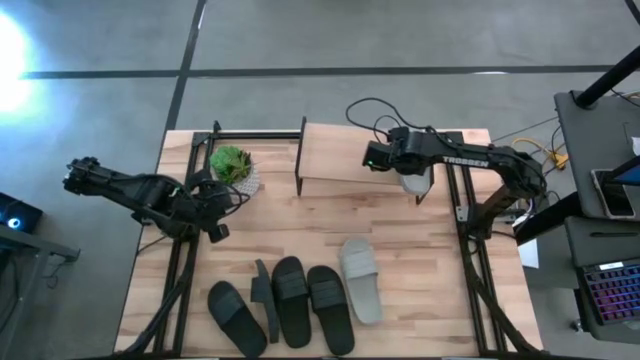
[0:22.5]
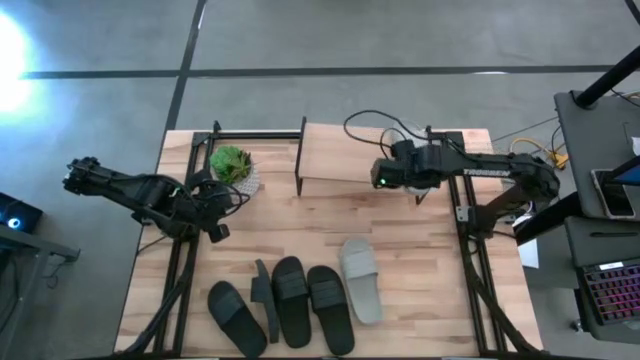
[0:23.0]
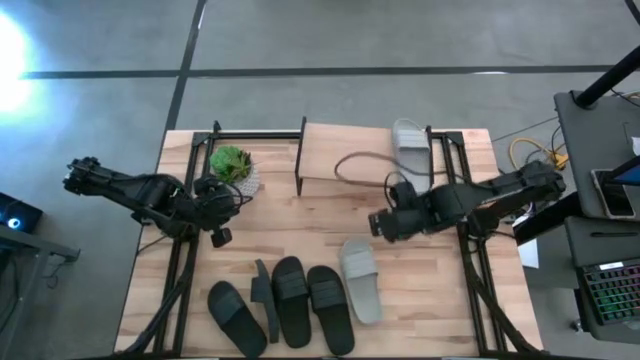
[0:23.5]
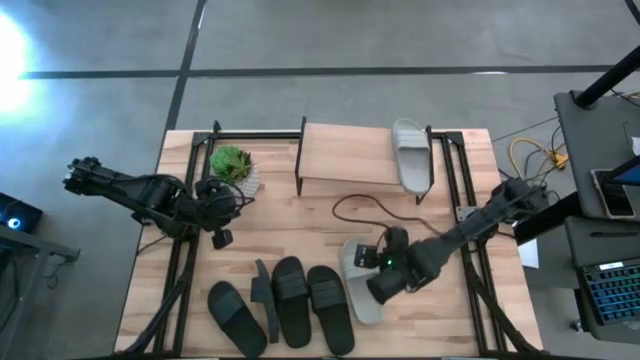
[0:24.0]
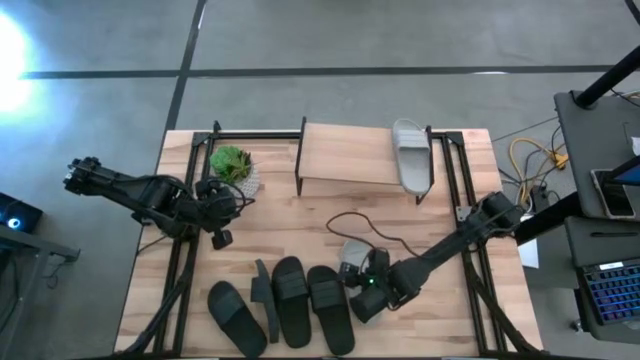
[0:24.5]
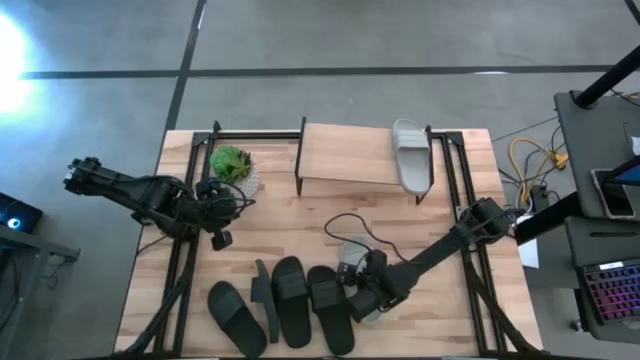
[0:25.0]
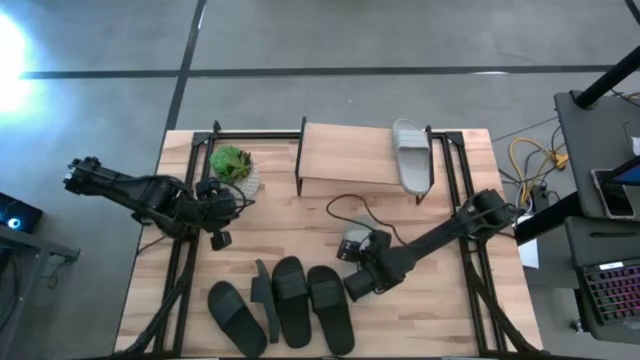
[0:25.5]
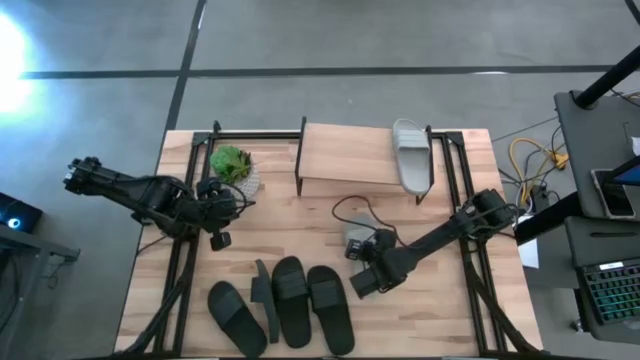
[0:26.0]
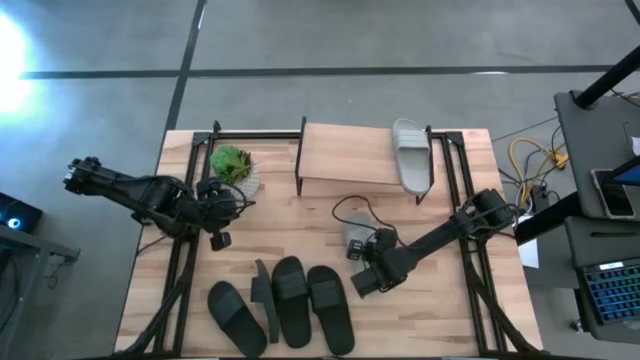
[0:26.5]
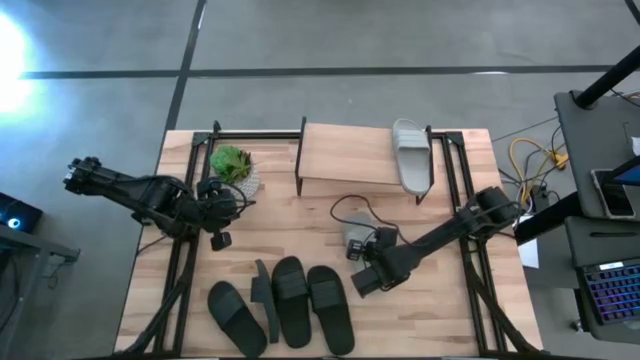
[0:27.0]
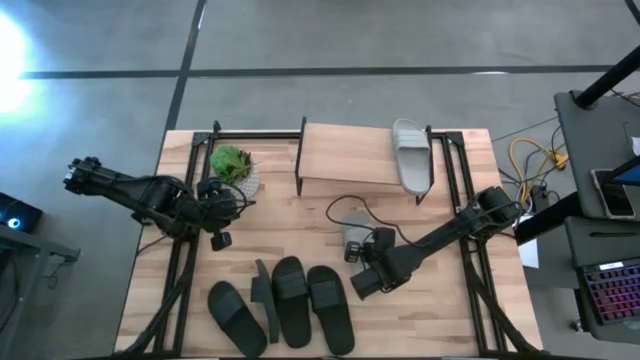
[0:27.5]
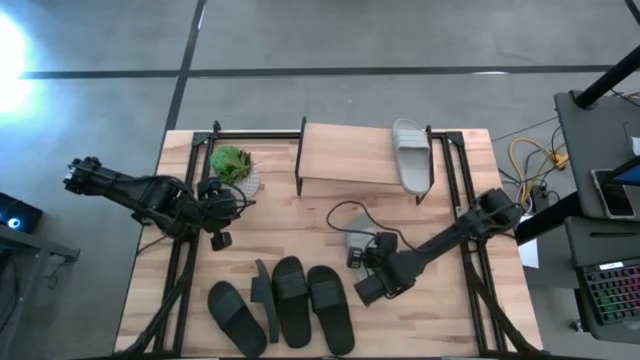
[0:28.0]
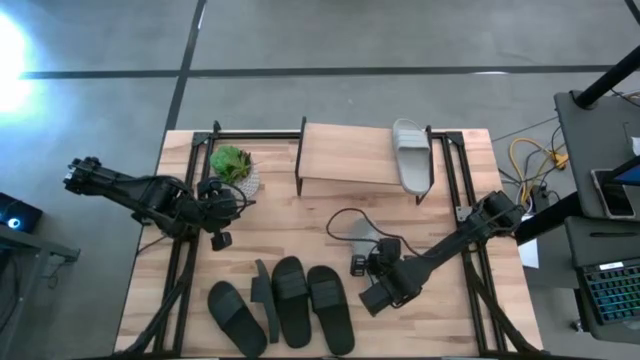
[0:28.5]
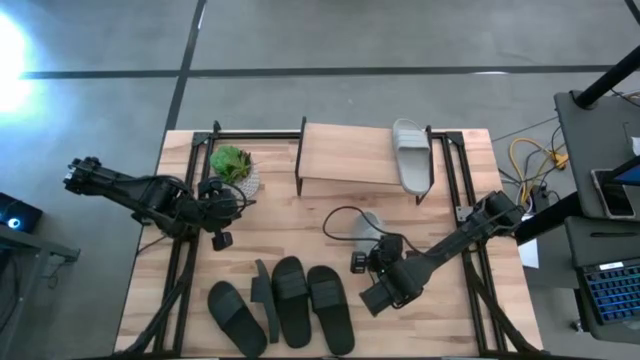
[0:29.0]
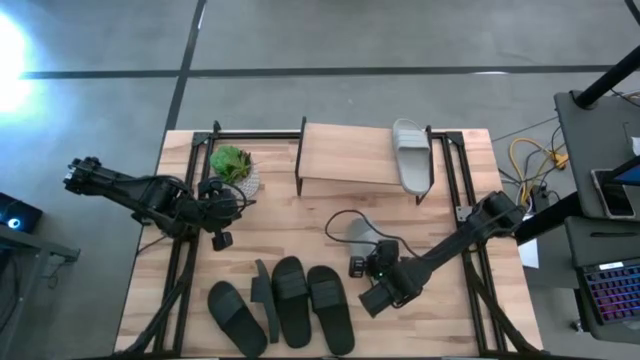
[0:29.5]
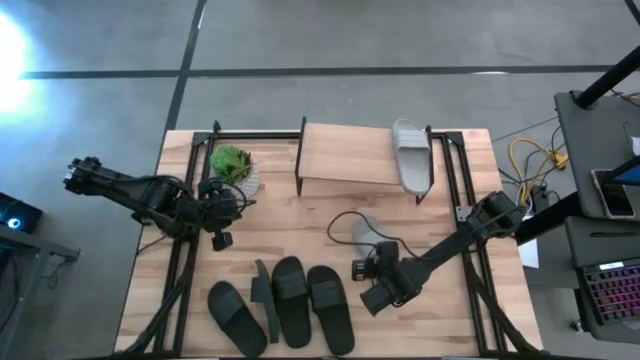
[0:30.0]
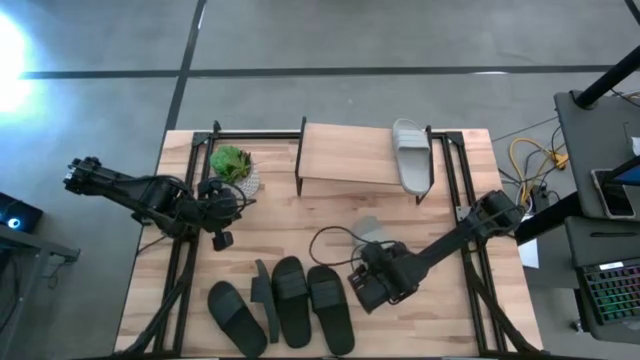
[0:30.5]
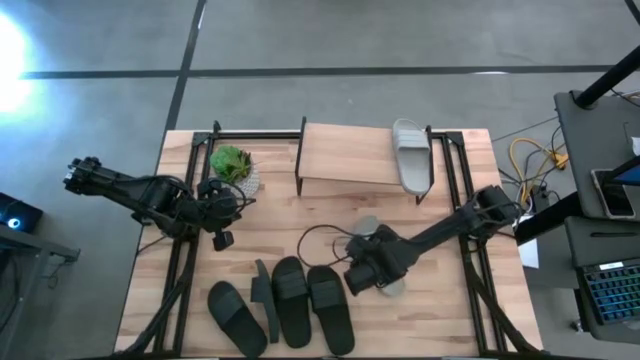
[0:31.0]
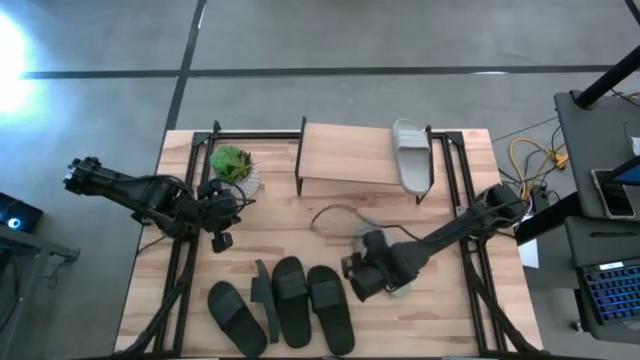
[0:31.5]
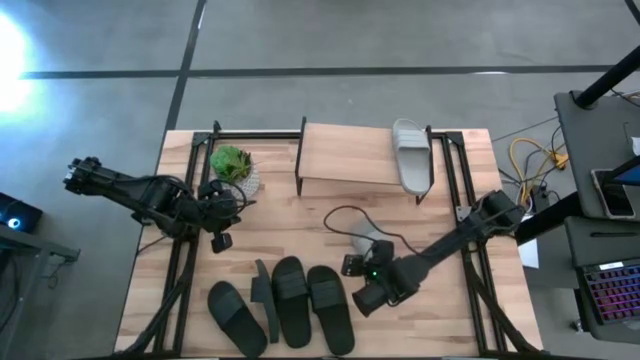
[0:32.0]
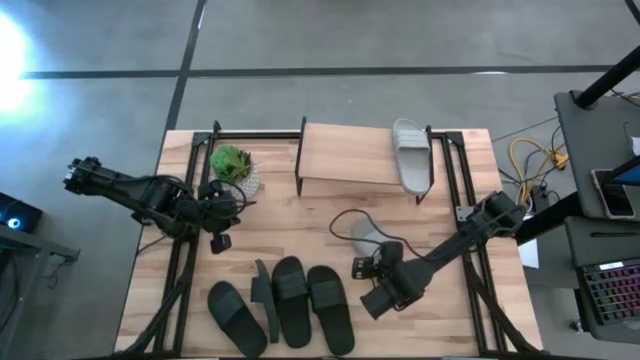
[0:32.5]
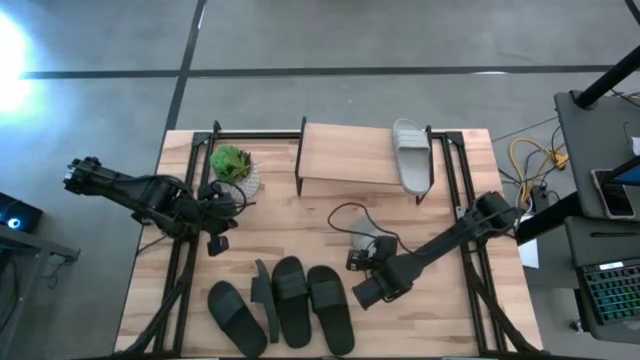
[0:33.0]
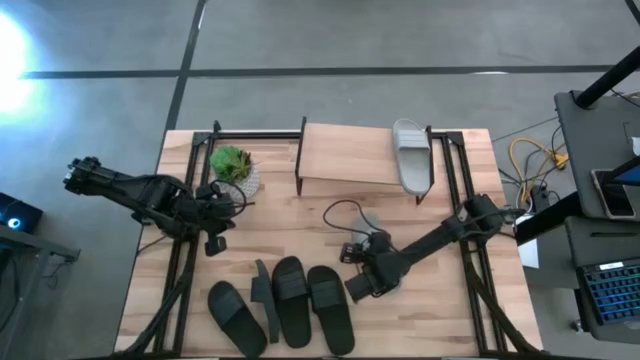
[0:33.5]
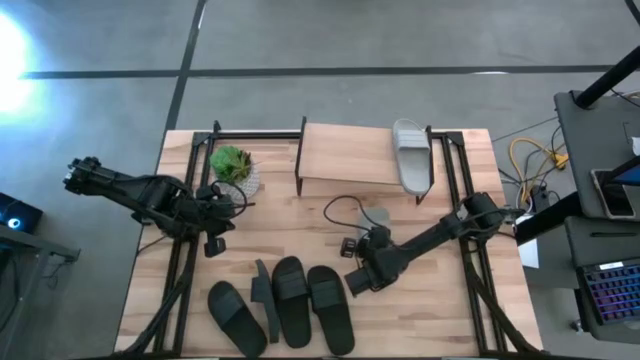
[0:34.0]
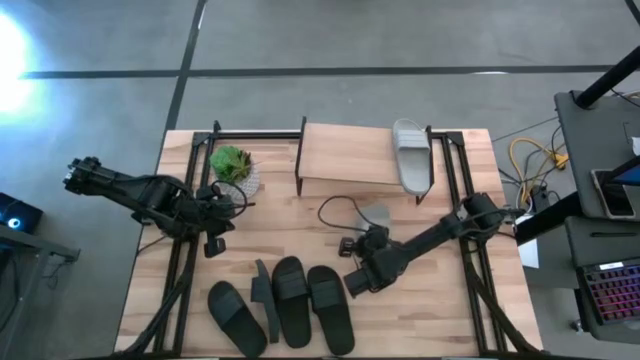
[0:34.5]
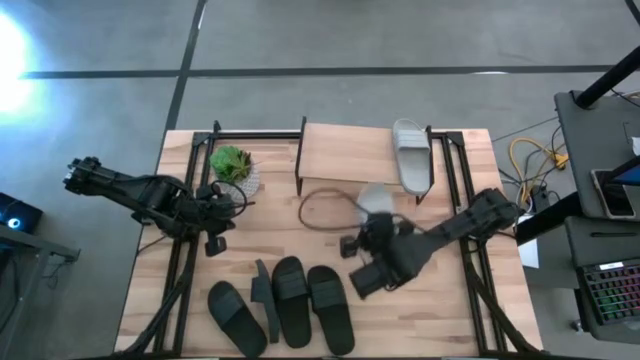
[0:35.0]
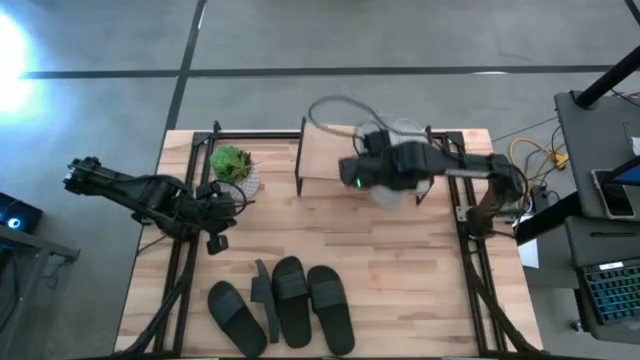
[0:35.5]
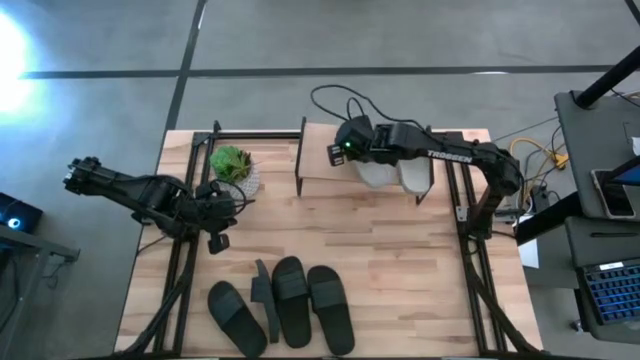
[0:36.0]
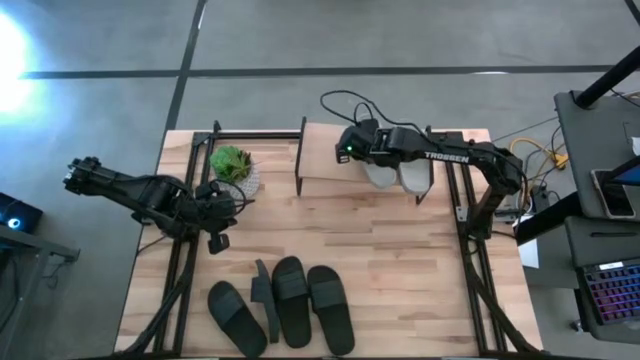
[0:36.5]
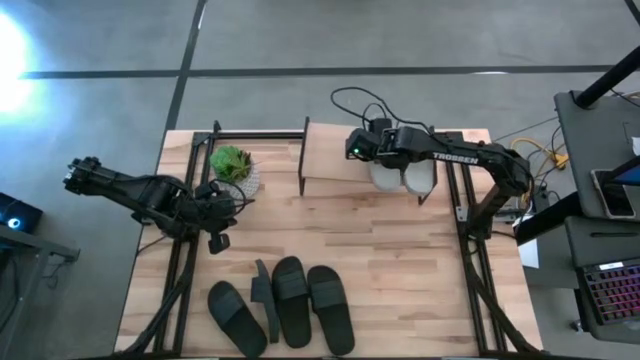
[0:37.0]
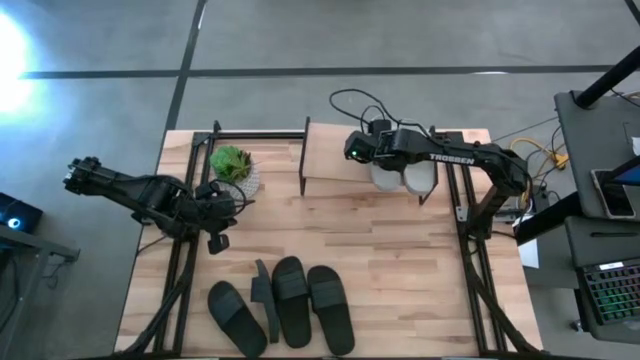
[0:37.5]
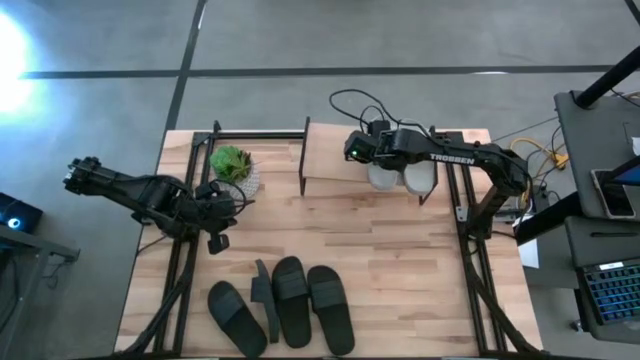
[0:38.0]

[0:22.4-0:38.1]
Task: Pick and place slides into the shelf
Put the gray slipper on the shelf
